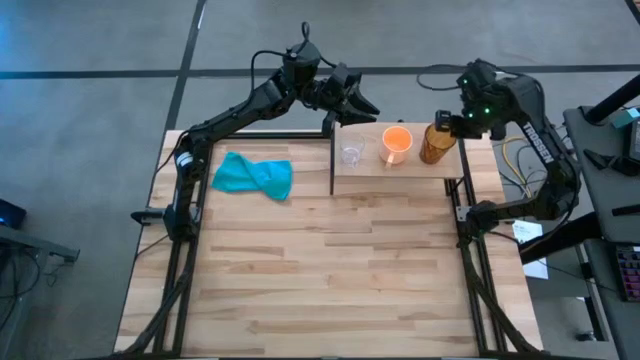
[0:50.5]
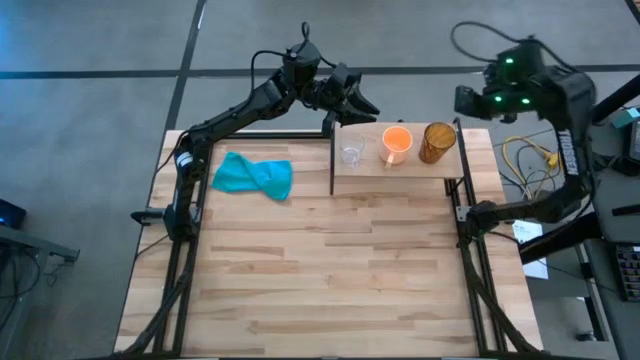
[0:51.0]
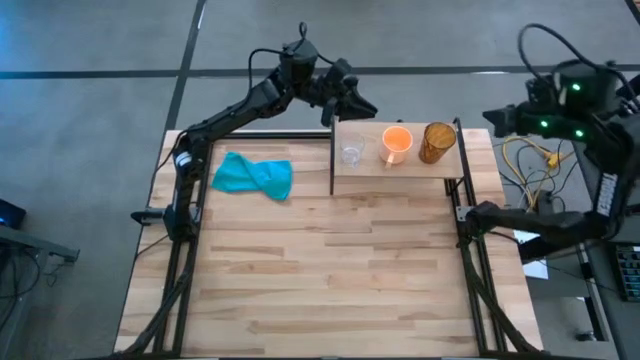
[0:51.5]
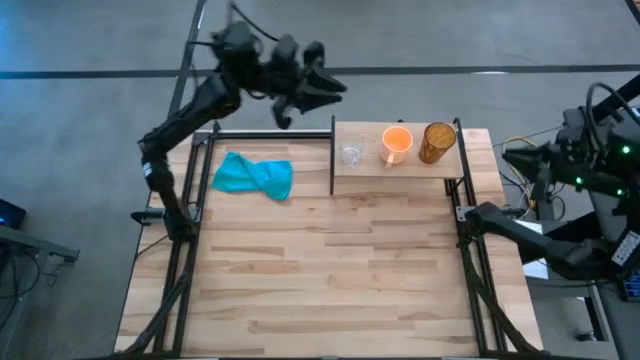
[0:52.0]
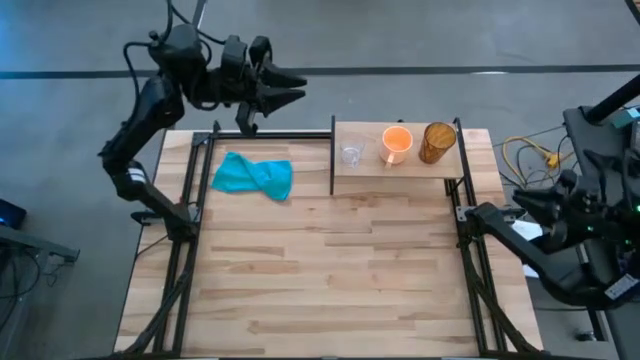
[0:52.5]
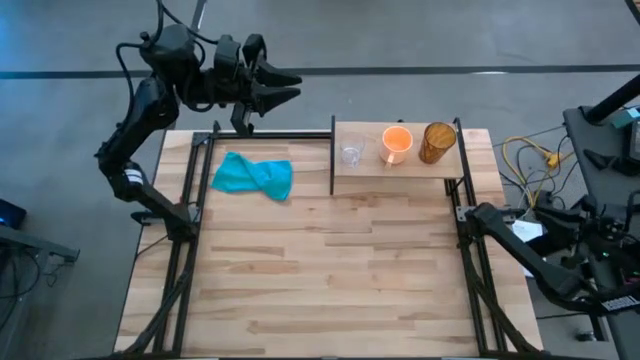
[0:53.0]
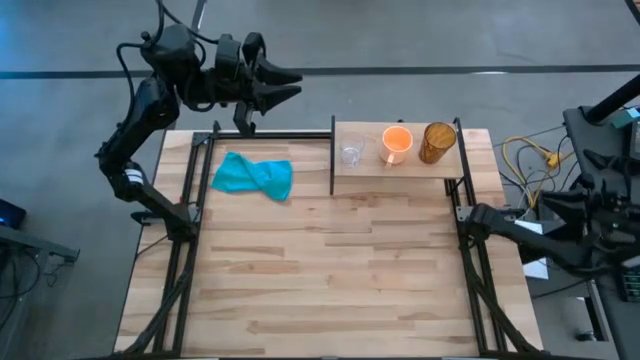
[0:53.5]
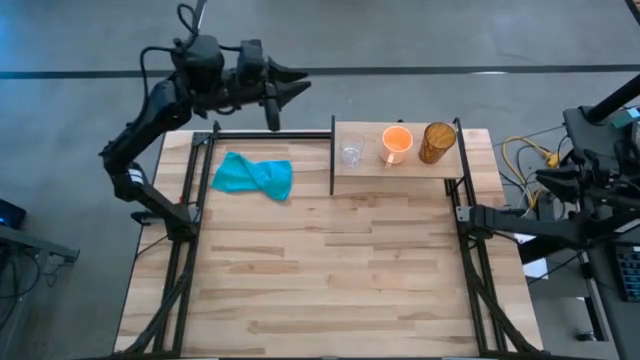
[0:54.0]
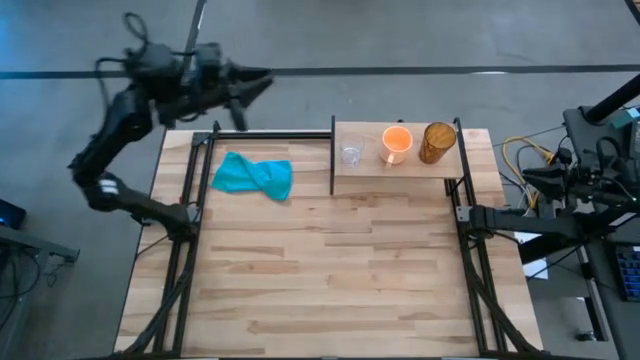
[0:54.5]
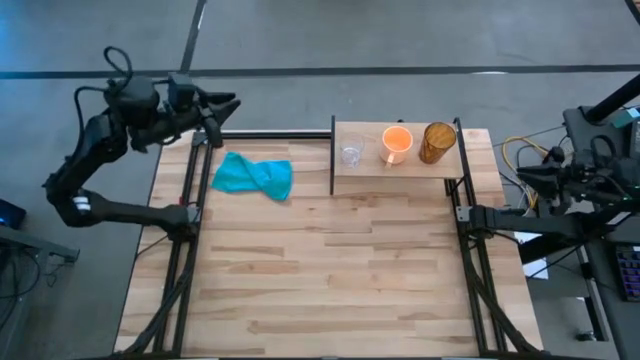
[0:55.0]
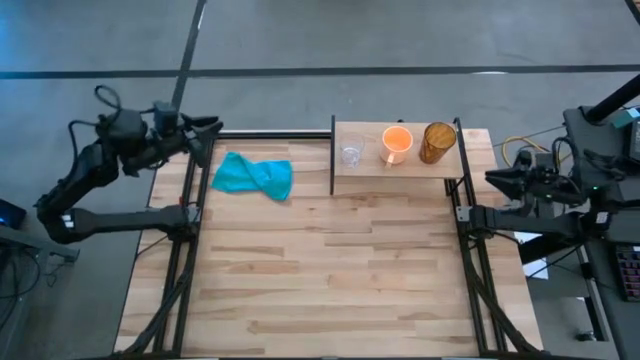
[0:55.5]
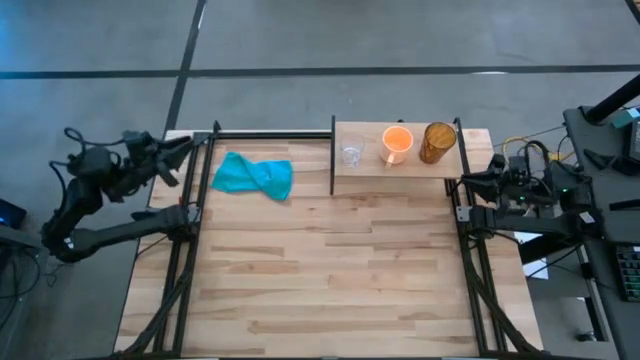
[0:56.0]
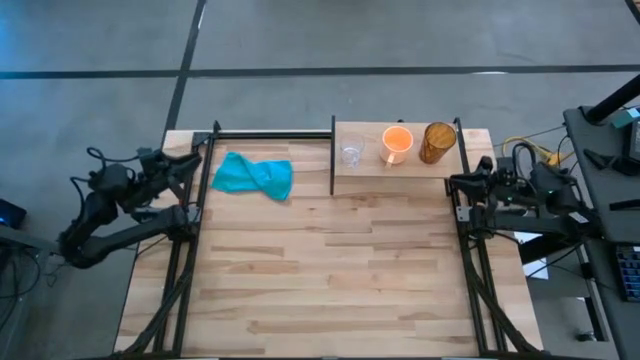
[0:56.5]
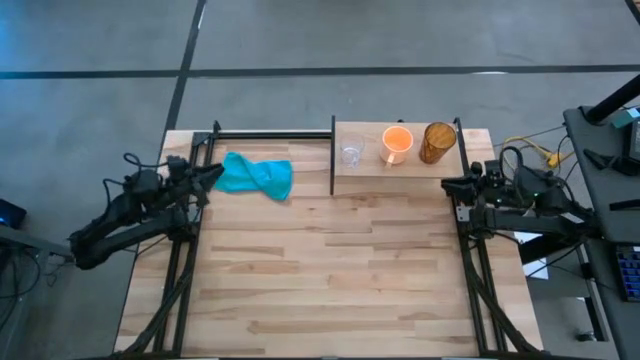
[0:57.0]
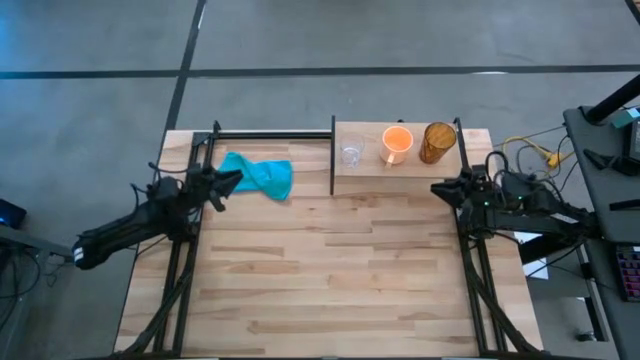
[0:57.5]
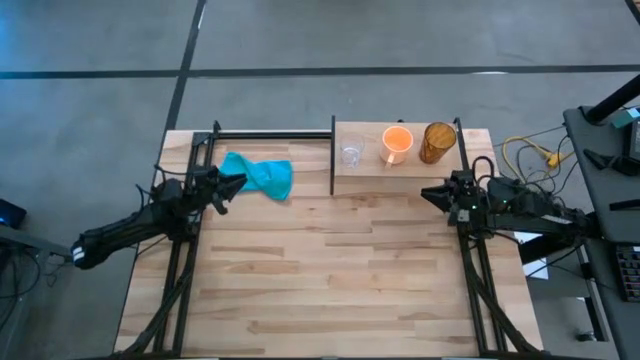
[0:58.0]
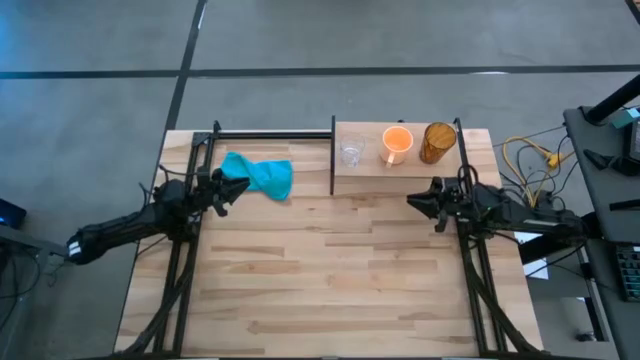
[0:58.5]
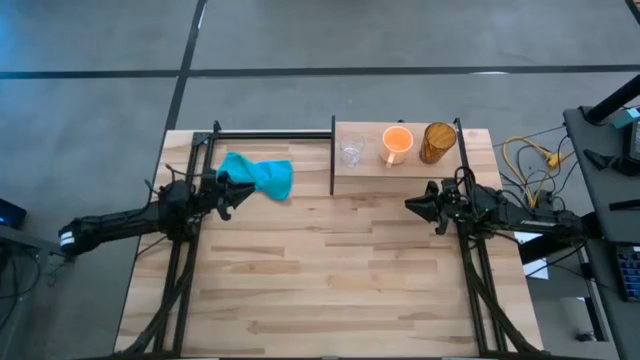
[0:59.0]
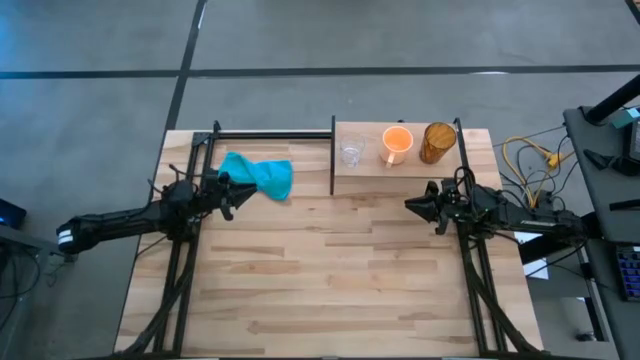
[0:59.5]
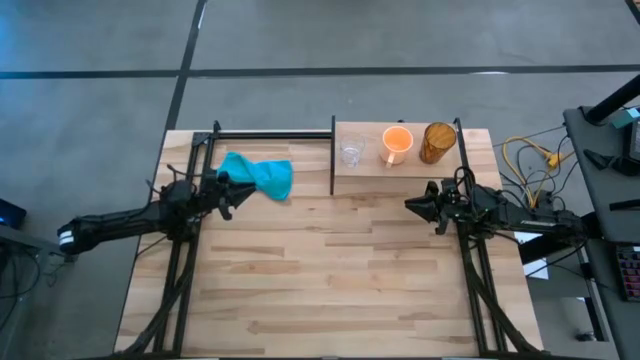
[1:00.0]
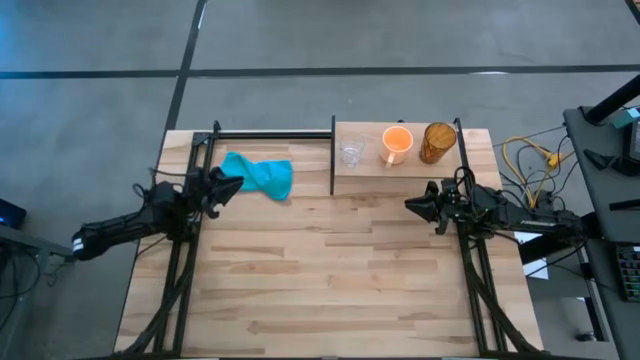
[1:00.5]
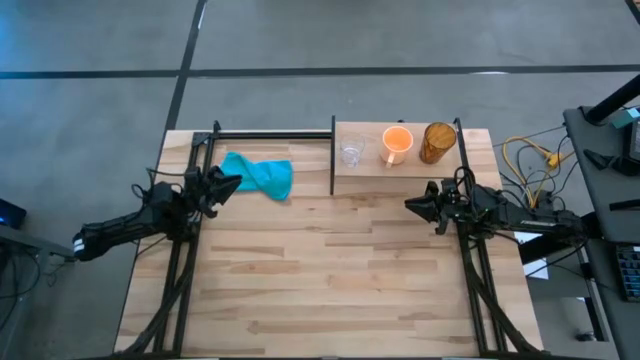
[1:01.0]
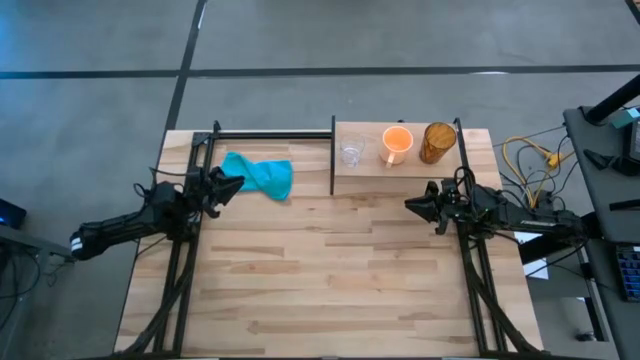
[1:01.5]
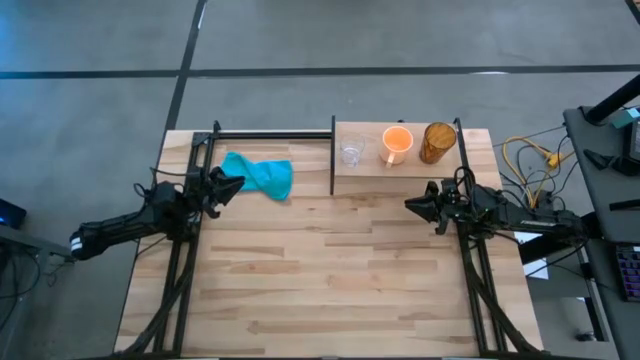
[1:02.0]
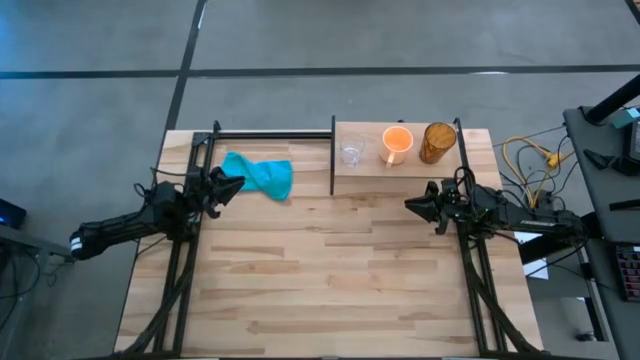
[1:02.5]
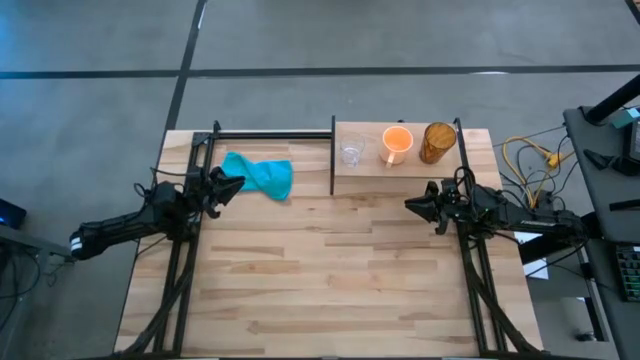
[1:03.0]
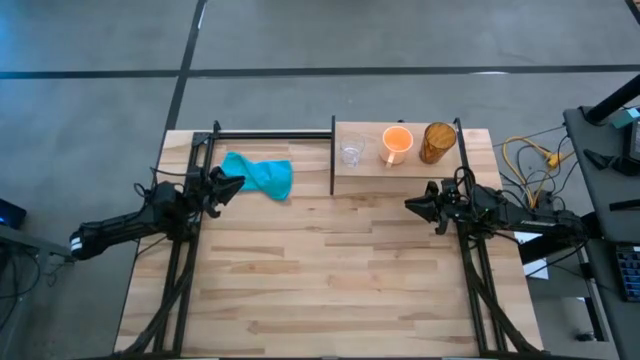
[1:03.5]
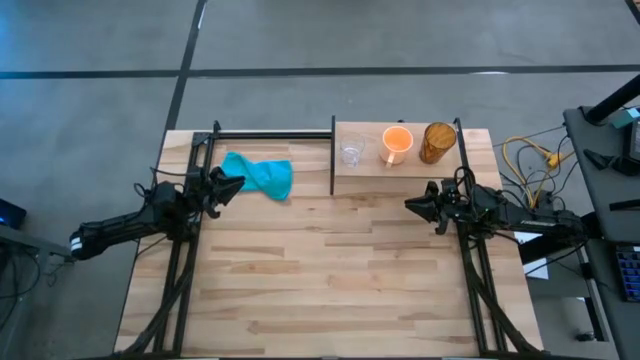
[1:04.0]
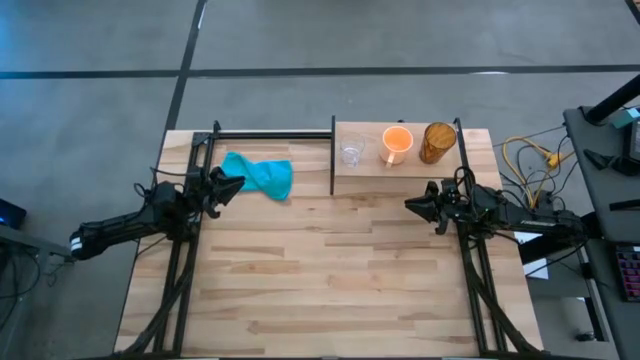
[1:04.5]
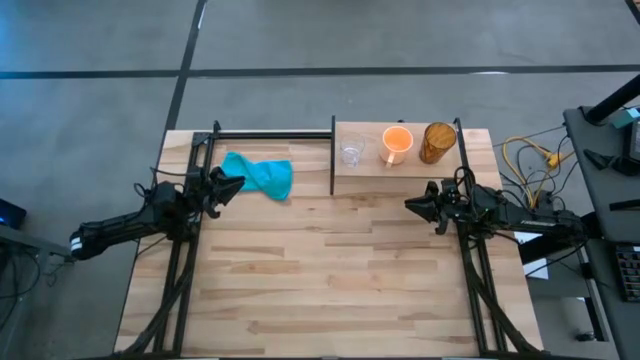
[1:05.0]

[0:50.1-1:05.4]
Task: Stack small to large cups/mugs on shelf
Return to Home Position

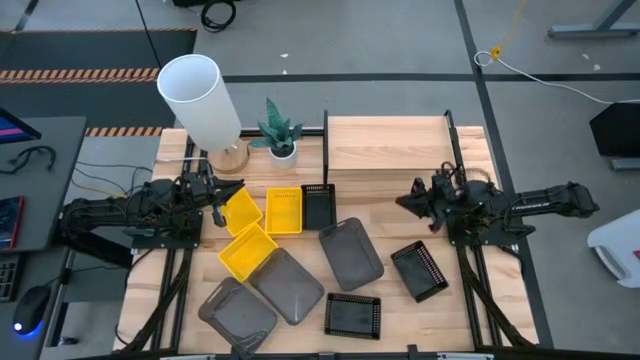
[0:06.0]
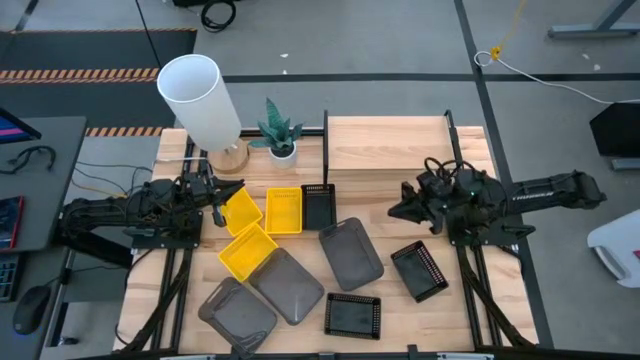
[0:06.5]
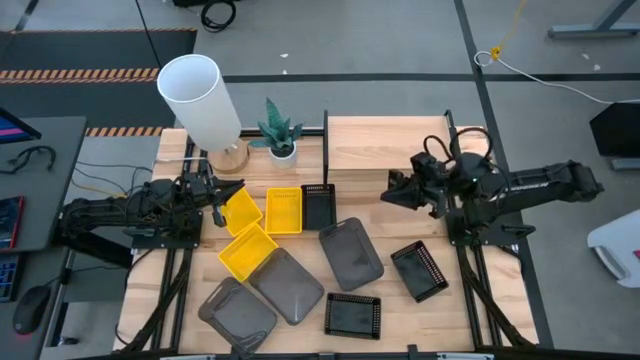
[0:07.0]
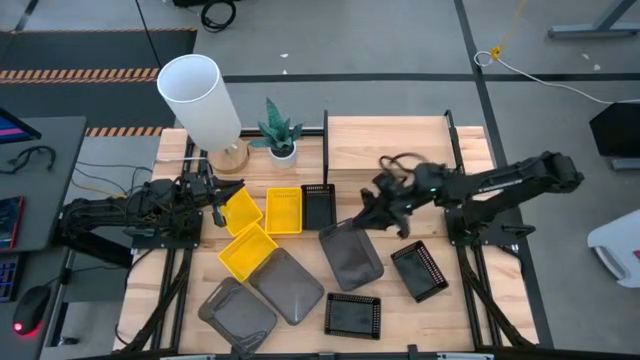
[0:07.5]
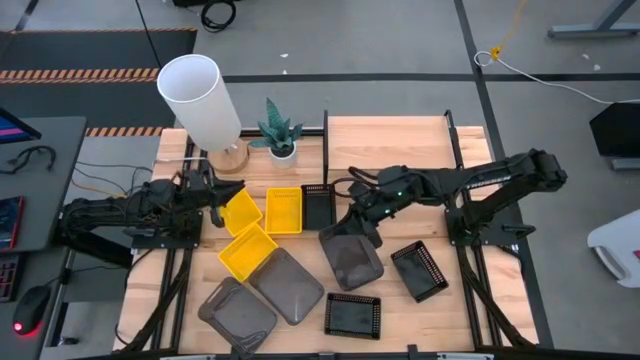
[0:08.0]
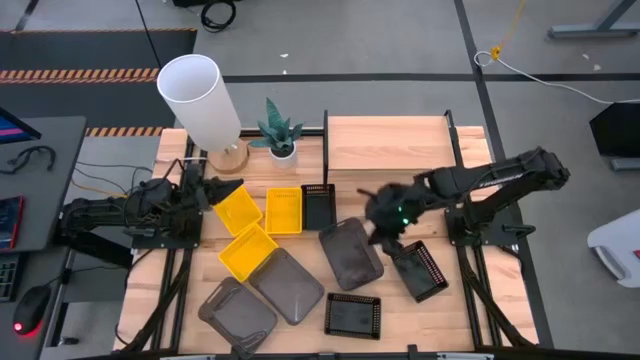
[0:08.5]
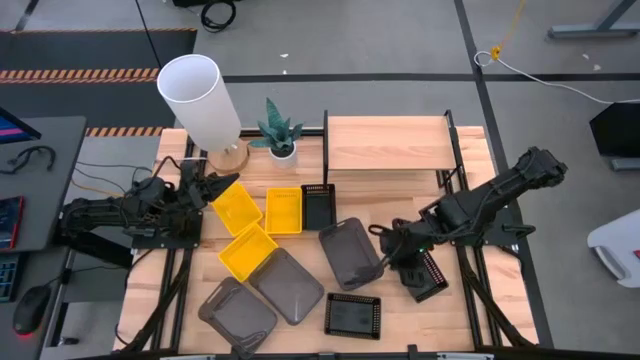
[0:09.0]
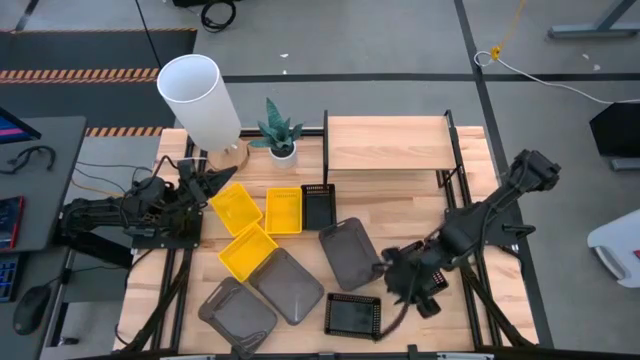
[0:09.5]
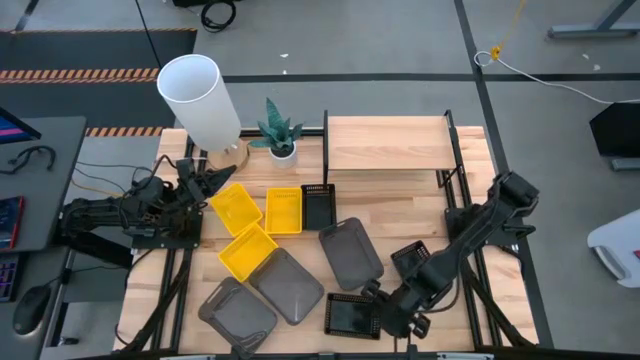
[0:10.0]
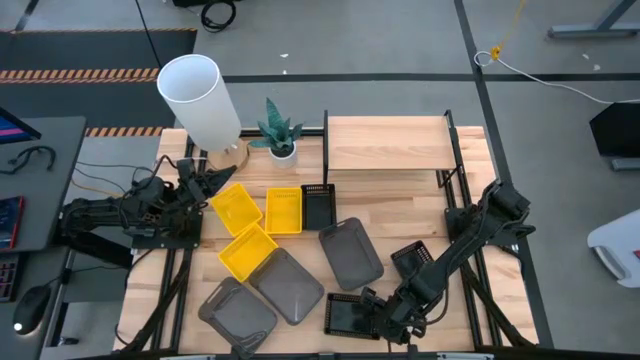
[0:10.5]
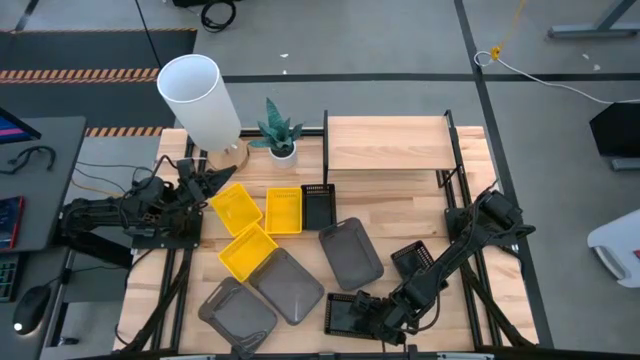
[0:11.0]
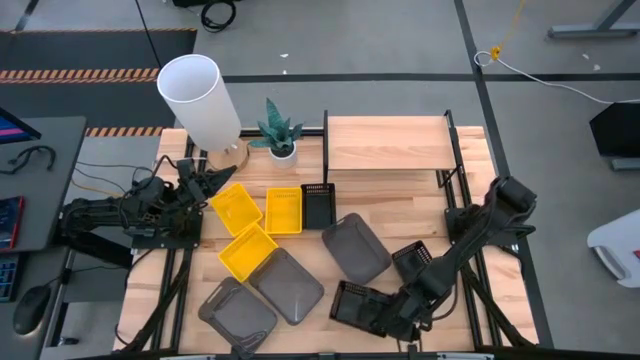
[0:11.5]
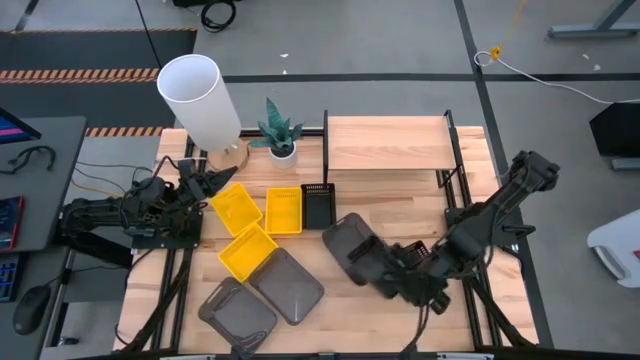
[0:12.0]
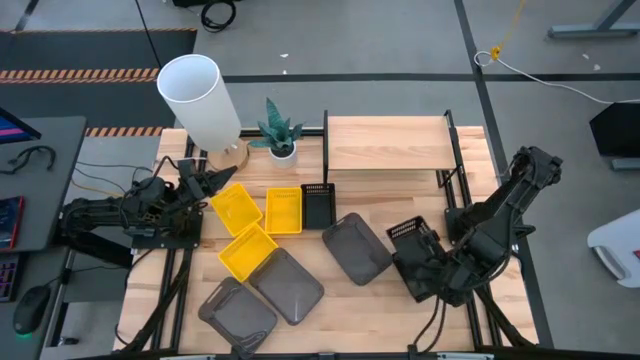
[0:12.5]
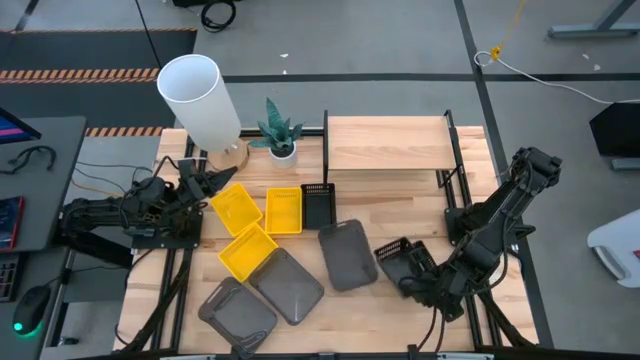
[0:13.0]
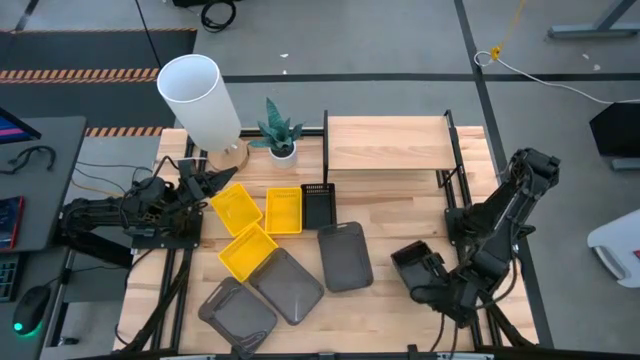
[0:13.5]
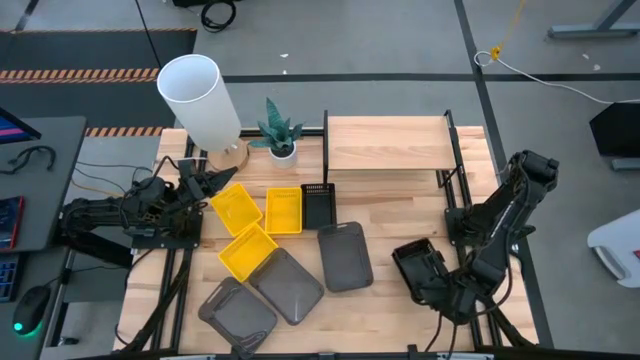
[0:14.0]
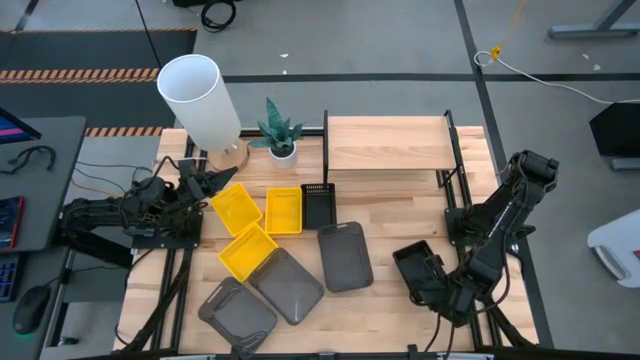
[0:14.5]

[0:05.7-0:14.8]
Task: Stack baskets on shelf by color
Stack the bottom black bin on the right black bin
